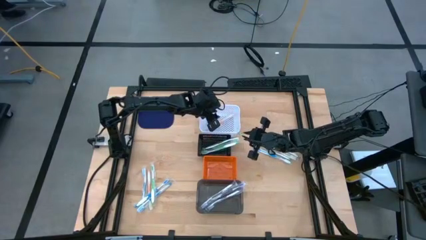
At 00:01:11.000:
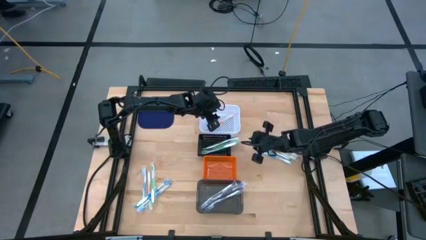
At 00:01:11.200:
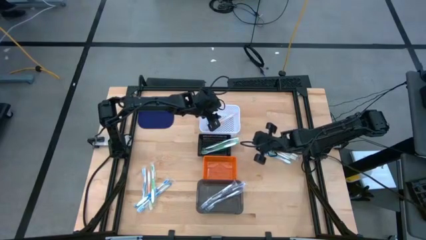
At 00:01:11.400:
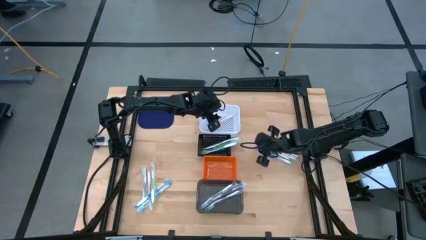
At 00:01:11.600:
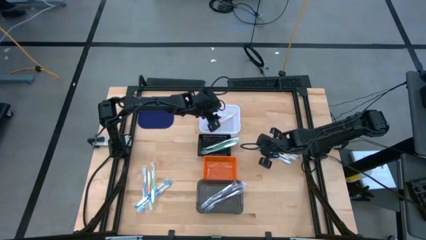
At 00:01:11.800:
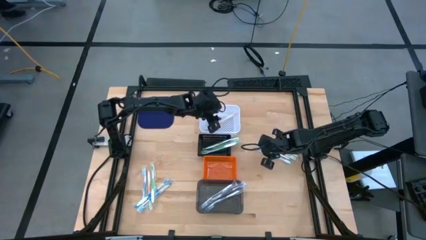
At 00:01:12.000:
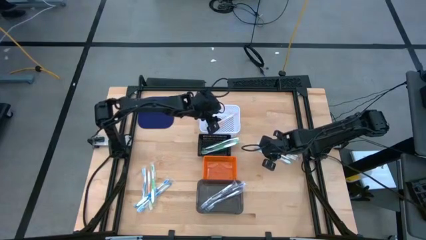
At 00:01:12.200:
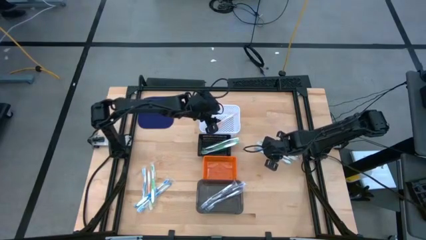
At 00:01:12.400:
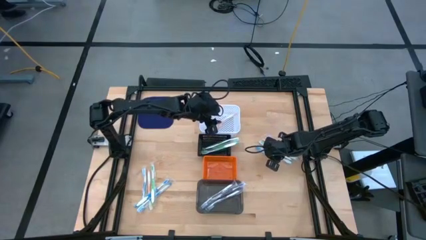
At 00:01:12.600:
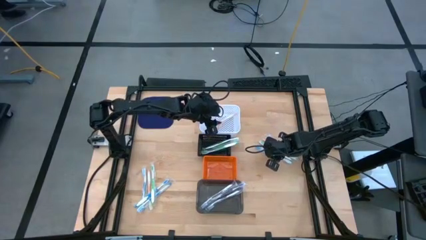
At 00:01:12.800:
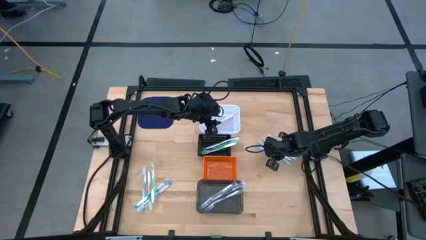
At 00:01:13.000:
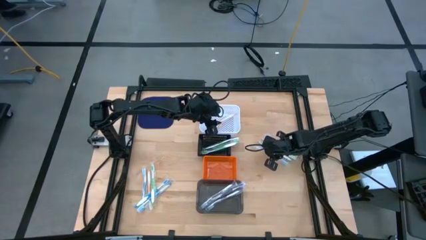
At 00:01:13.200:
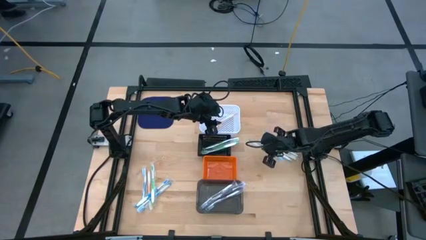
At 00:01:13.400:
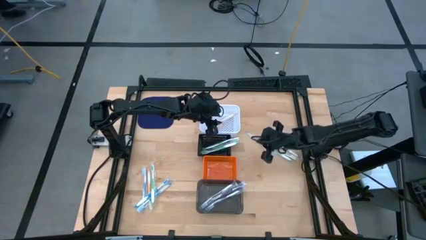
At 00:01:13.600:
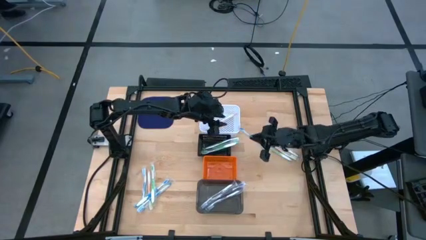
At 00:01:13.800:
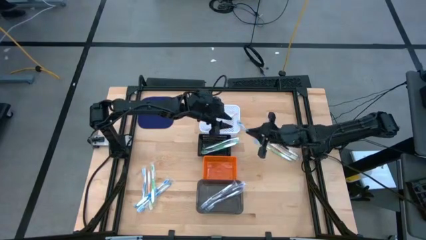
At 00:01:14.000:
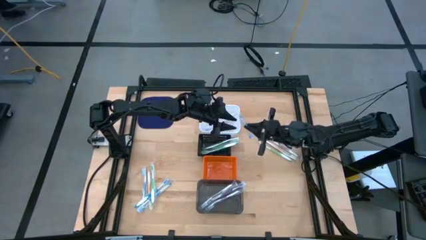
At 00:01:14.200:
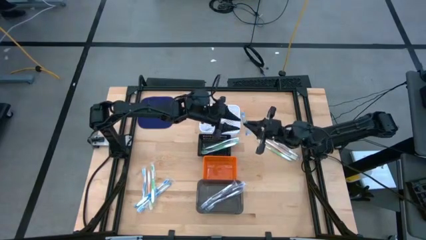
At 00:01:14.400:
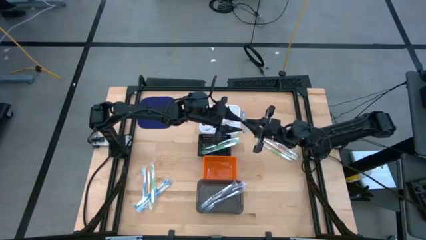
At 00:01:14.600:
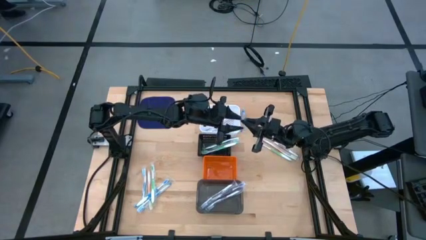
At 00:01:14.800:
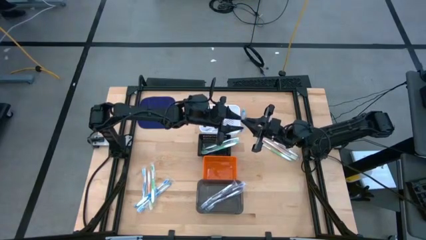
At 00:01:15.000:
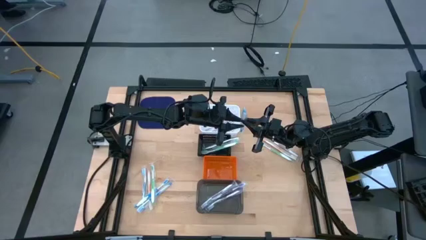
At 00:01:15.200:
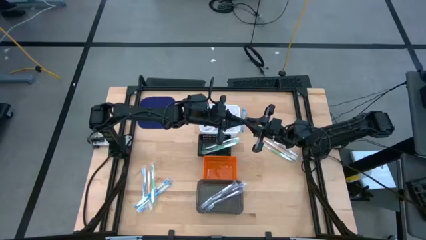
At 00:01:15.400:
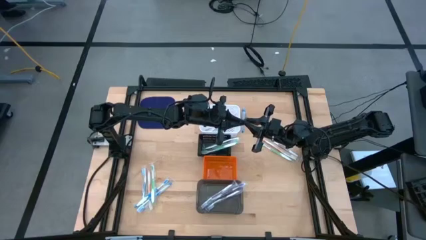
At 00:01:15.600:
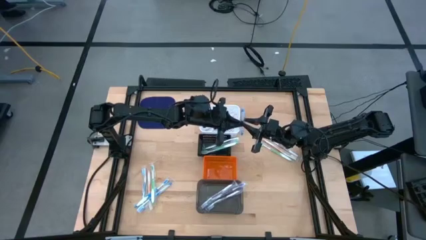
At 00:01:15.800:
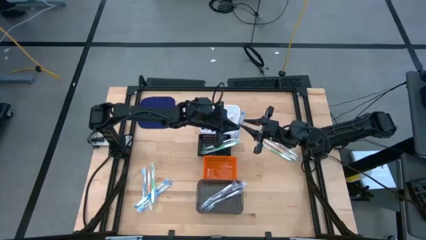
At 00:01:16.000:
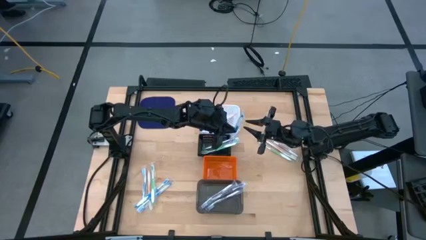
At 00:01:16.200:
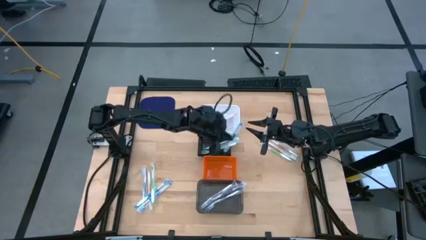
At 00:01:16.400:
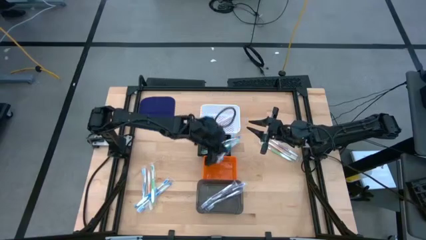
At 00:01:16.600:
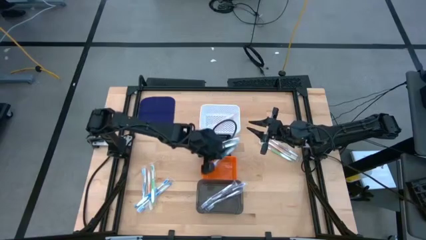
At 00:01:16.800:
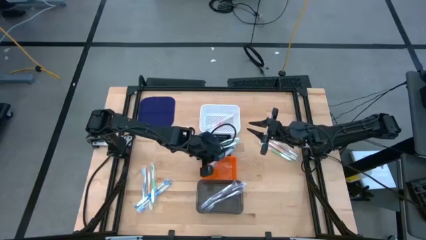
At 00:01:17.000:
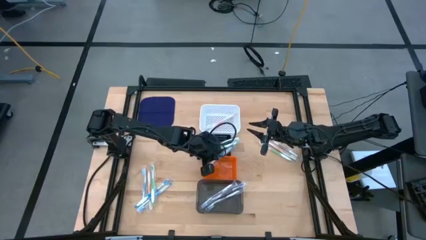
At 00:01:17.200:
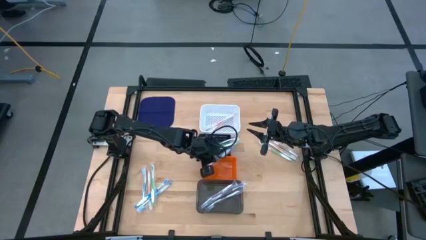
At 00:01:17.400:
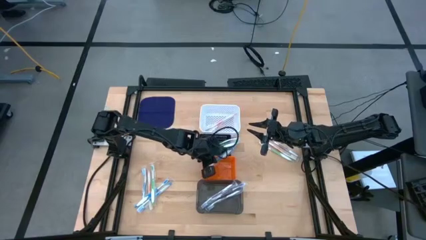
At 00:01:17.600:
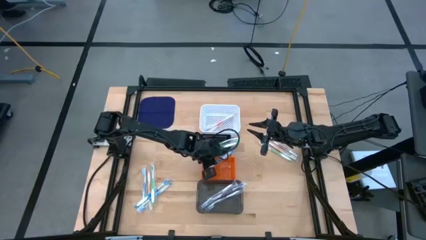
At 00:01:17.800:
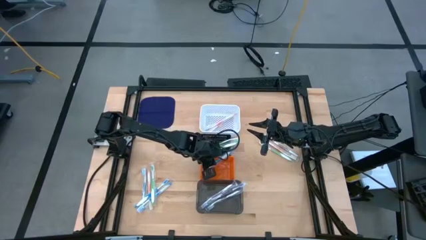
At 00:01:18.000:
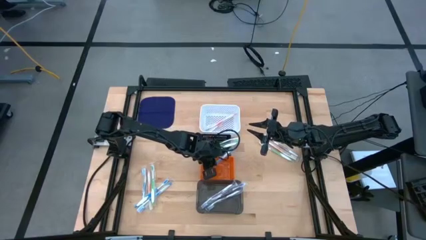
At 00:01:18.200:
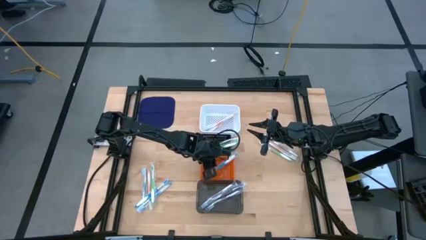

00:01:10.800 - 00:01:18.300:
Task: Pick & Place Toothbrushes
Put the blue toothbrush into the orange basket

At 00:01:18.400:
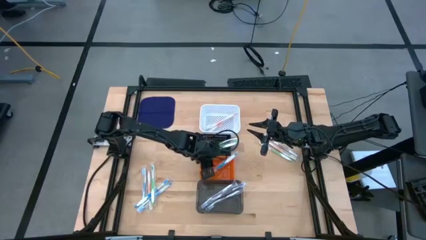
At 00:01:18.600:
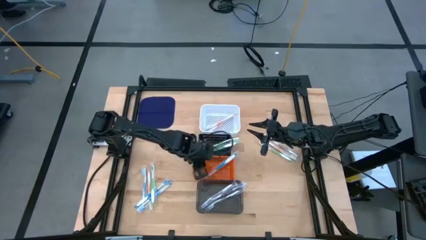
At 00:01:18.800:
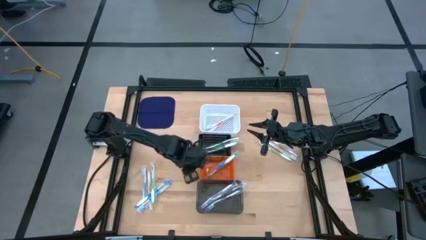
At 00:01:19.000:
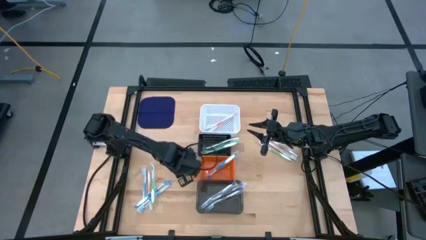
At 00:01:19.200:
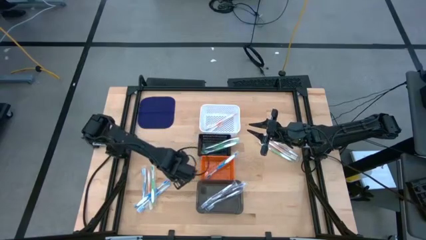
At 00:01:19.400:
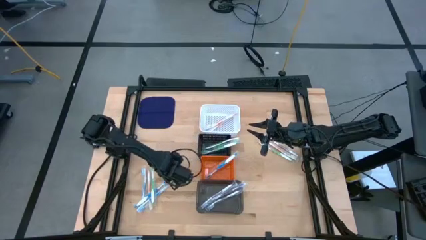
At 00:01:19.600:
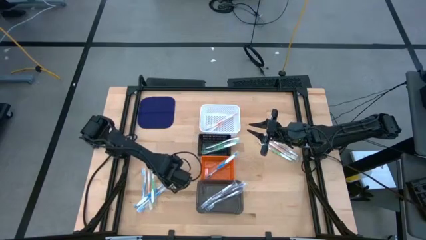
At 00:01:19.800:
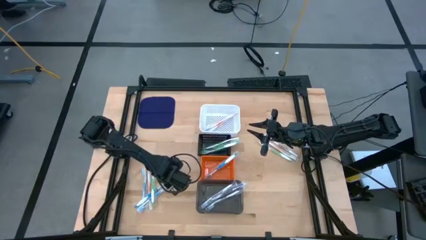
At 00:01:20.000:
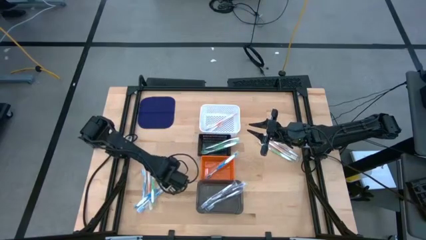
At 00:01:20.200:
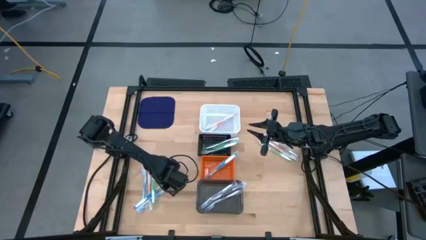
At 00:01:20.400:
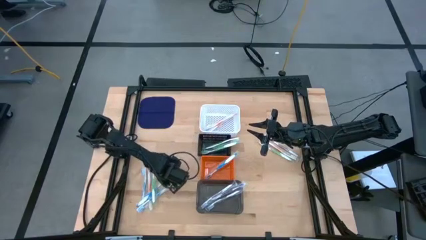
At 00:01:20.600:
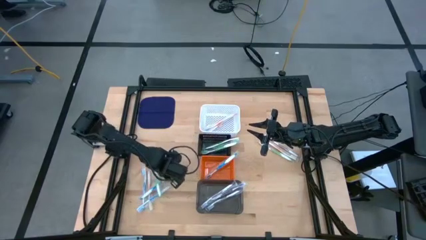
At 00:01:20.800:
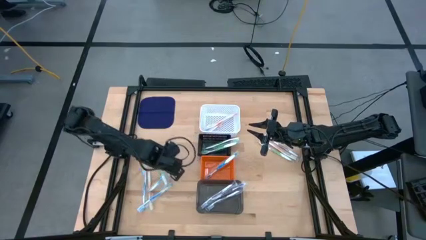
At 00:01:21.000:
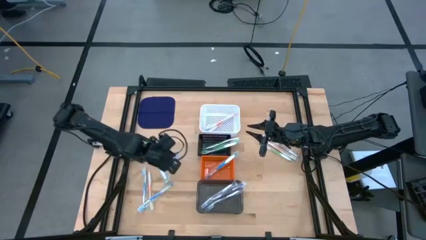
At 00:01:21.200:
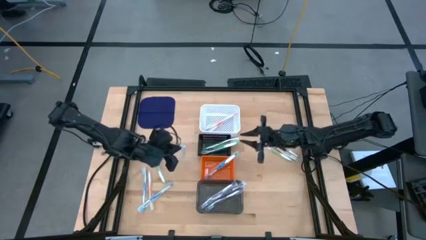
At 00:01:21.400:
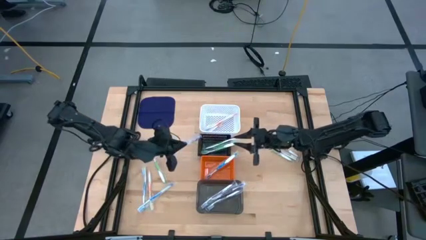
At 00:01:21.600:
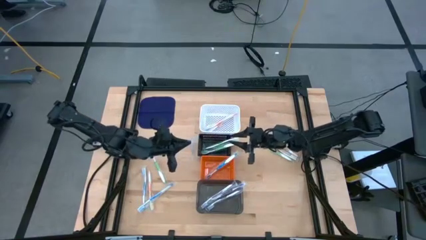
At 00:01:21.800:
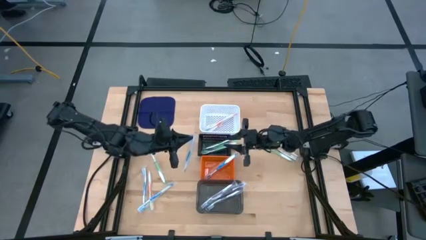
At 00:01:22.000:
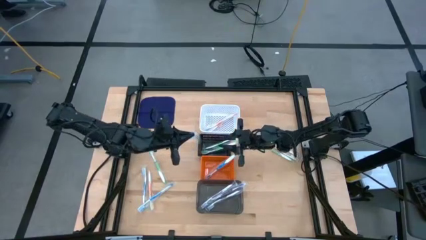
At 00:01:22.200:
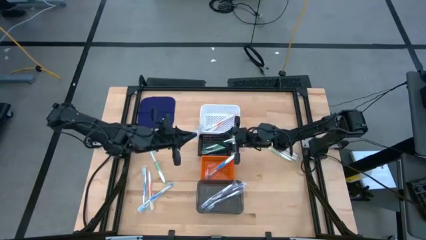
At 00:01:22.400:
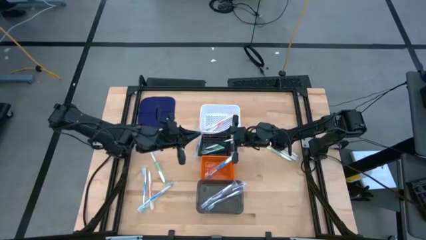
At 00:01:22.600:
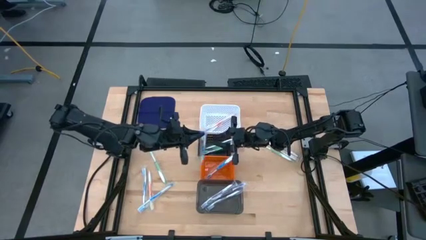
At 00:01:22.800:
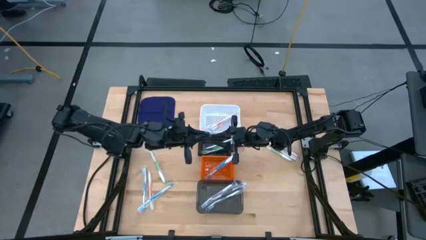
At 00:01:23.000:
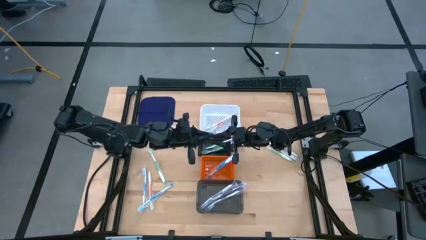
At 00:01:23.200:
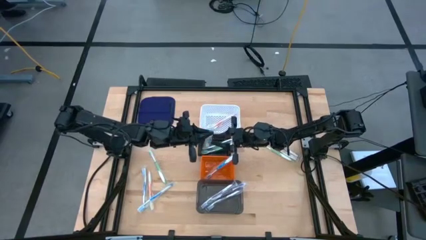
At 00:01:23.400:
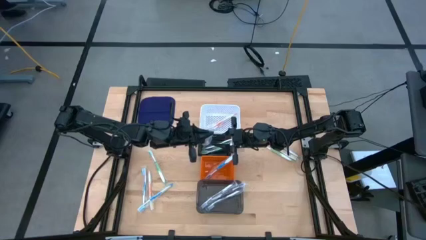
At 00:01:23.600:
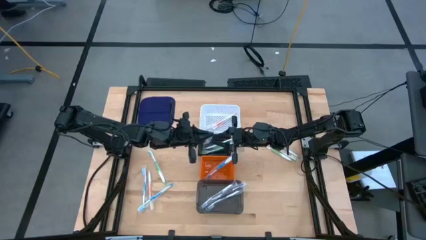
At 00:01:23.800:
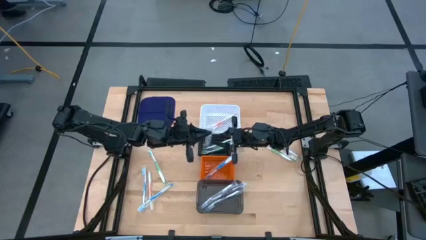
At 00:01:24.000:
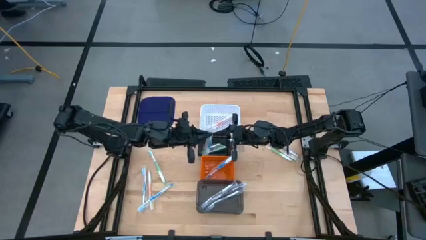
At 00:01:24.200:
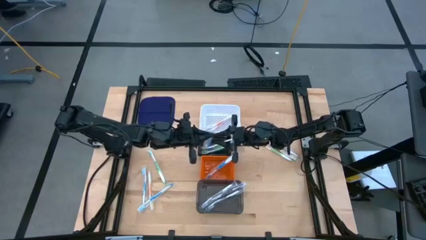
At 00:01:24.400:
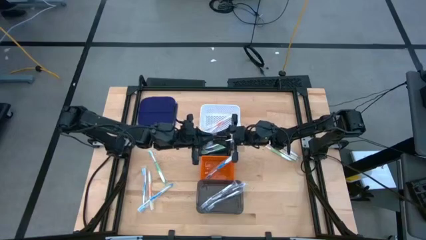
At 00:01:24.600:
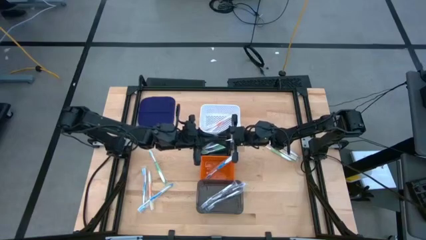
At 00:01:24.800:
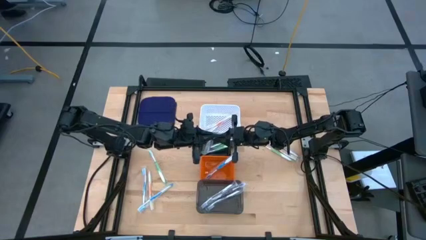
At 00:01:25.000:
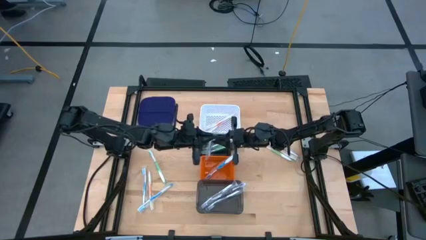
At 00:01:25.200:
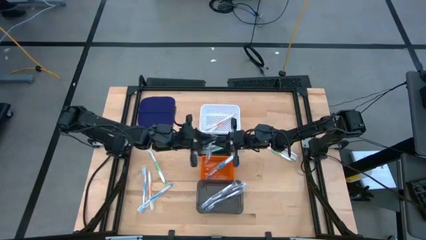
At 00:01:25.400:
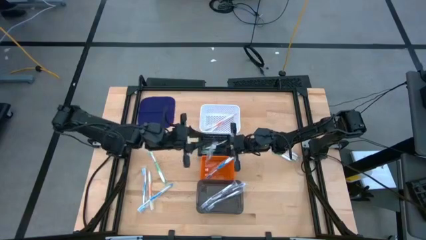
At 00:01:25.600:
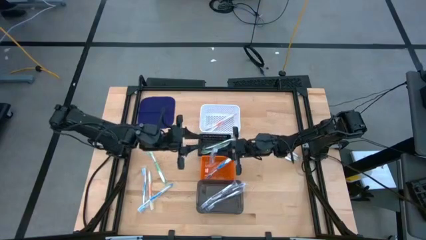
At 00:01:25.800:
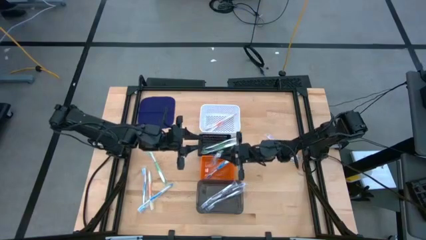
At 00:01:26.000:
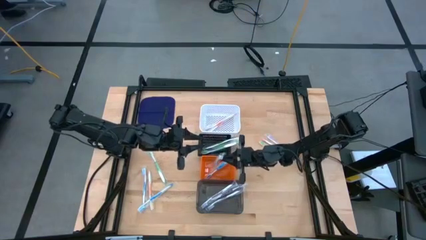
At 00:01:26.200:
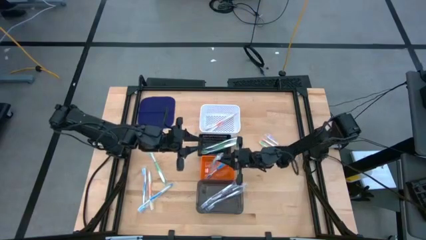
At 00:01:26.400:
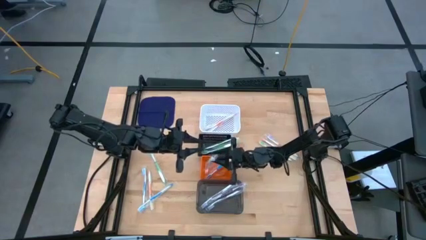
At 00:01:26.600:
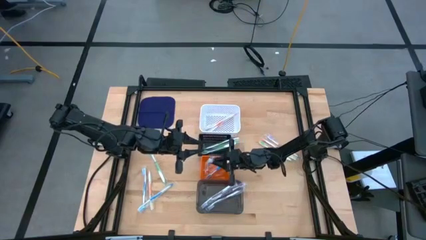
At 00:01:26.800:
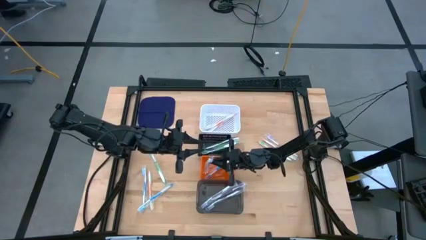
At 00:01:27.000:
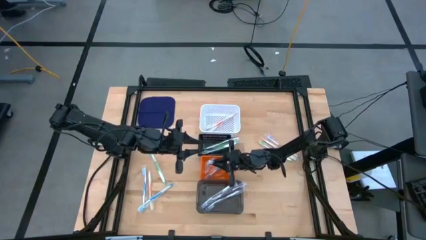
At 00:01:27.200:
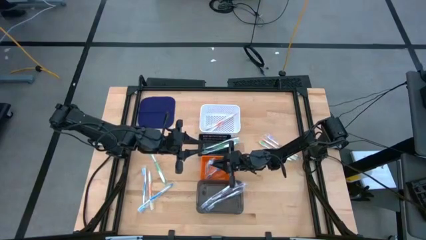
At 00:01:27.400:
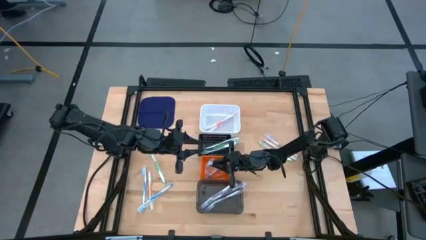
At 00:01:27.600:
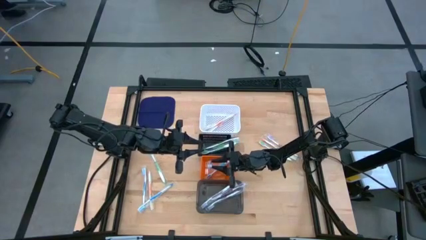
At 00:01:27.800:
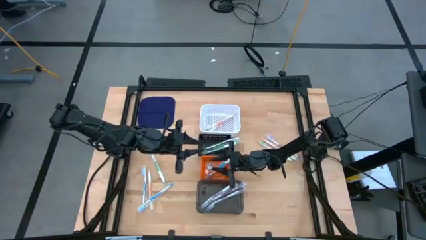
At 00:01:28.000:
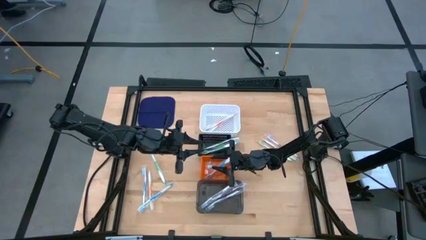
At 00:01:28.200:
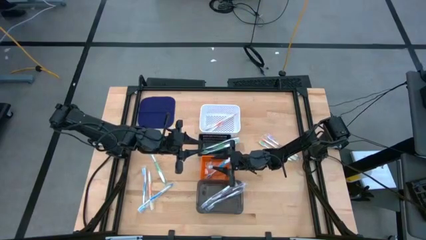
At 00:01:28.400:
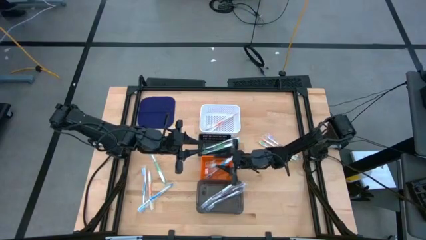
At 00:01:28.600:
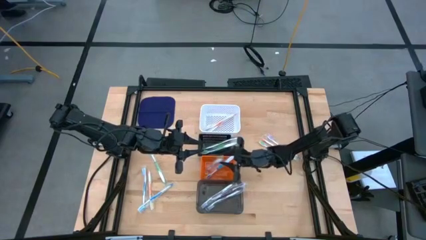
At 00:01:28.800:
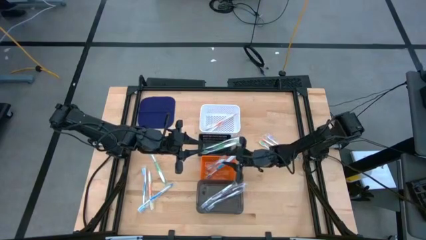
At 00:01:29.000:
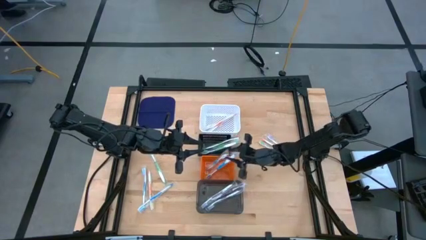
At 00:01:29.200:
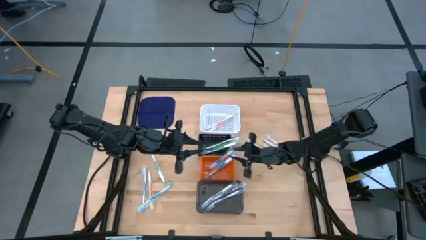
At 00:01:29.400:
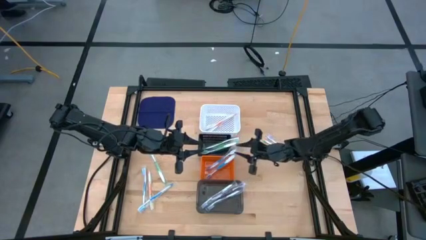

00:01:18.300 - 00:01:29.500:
Put the blue toothbrush into the orange basket
